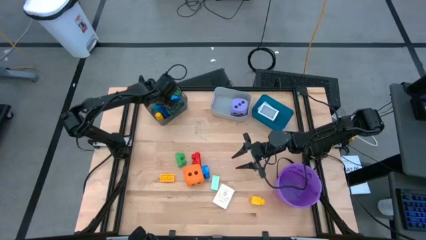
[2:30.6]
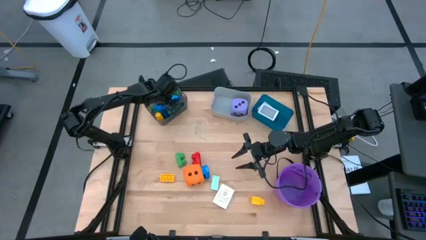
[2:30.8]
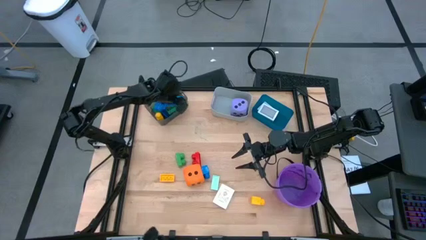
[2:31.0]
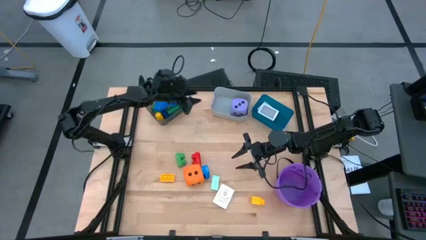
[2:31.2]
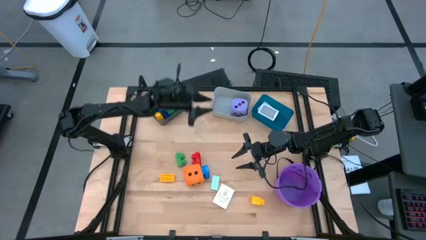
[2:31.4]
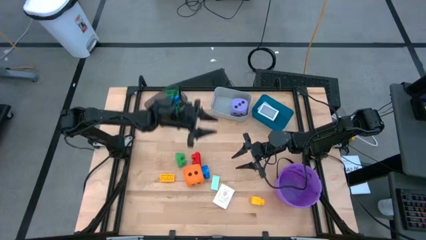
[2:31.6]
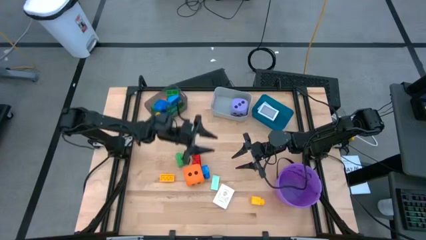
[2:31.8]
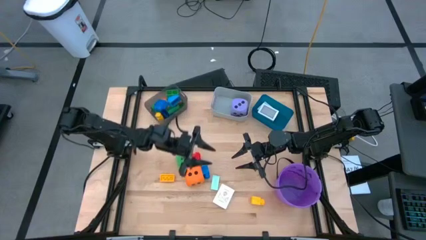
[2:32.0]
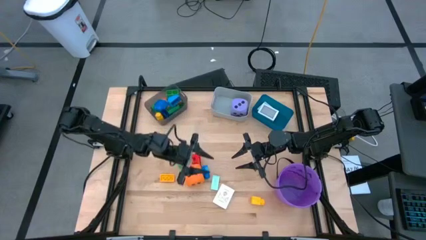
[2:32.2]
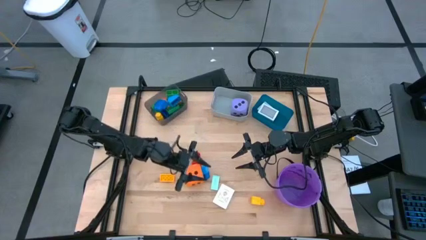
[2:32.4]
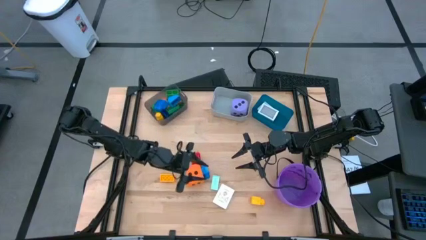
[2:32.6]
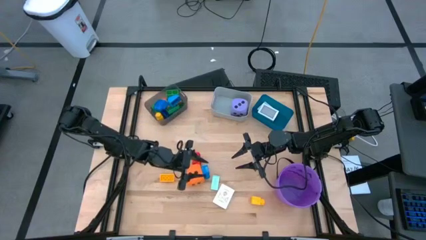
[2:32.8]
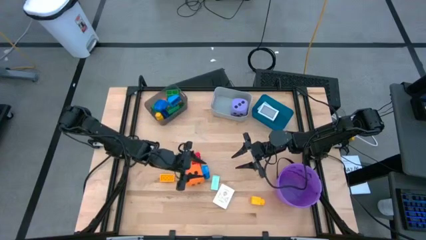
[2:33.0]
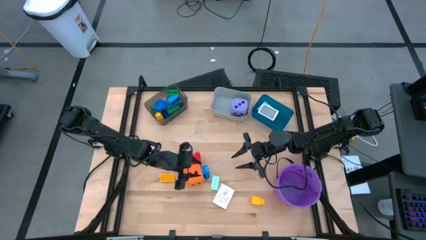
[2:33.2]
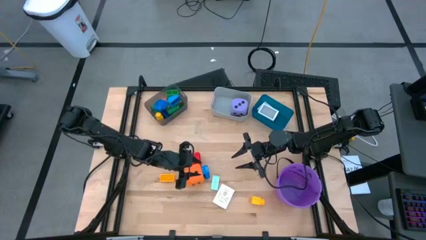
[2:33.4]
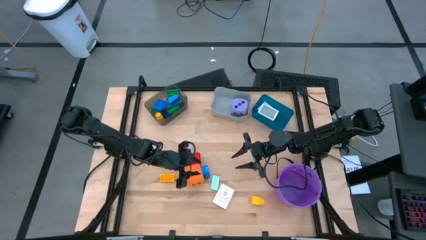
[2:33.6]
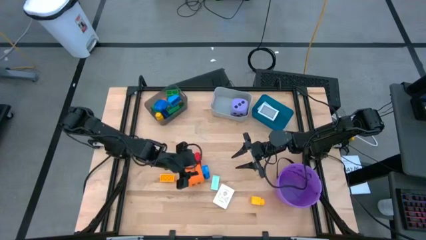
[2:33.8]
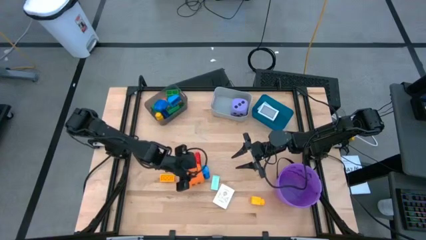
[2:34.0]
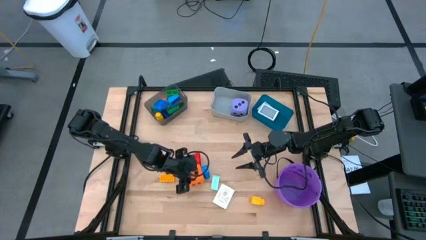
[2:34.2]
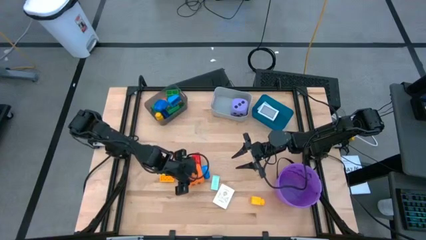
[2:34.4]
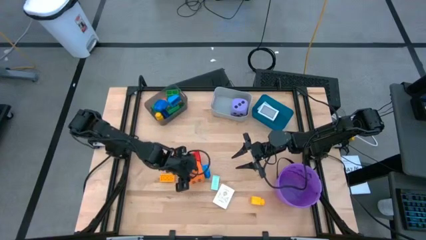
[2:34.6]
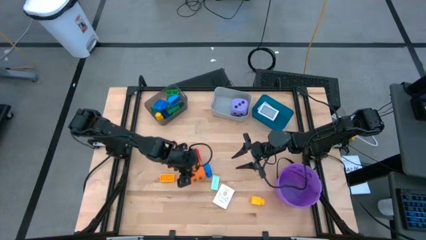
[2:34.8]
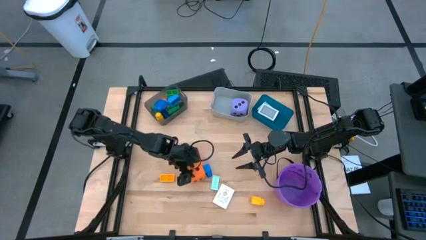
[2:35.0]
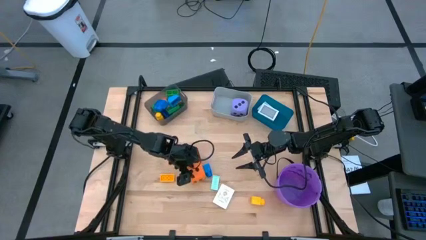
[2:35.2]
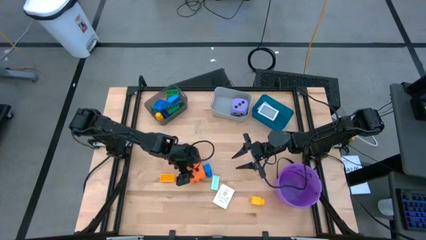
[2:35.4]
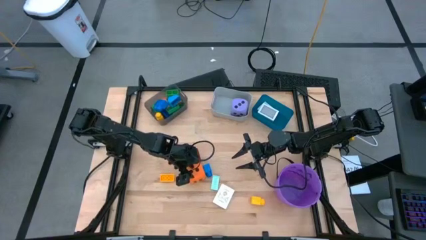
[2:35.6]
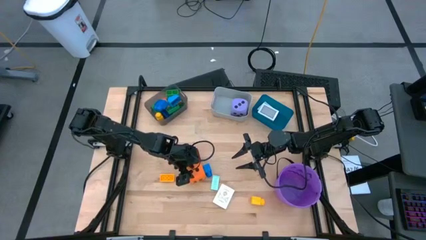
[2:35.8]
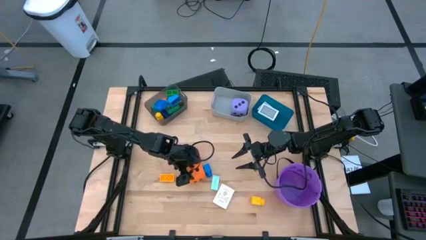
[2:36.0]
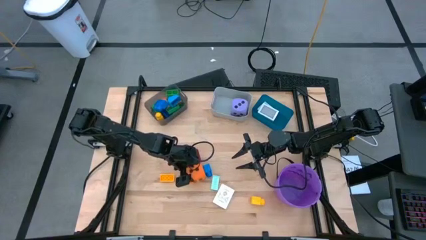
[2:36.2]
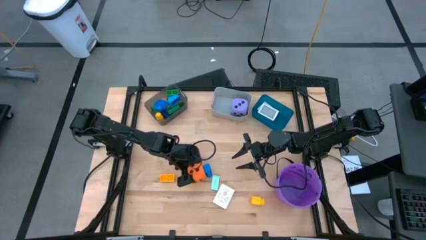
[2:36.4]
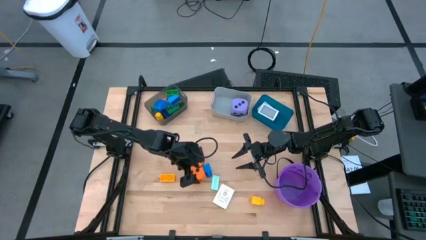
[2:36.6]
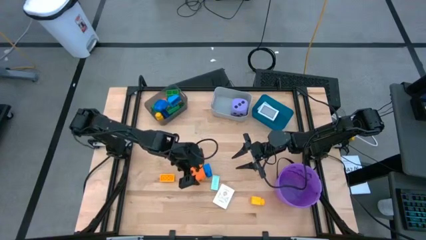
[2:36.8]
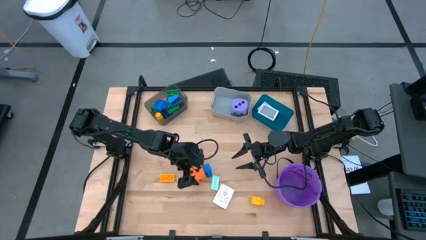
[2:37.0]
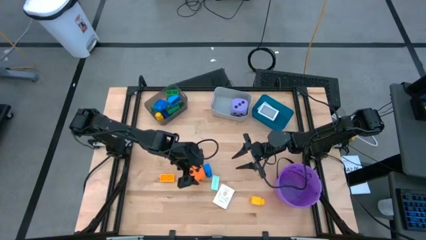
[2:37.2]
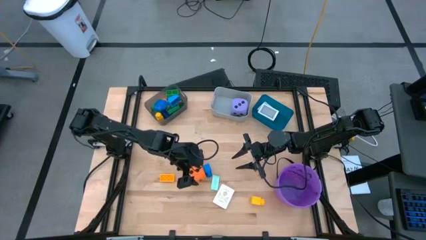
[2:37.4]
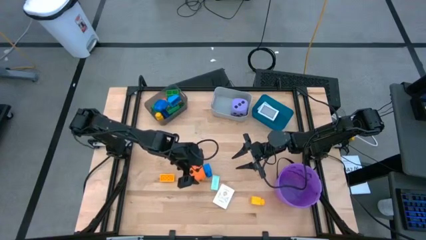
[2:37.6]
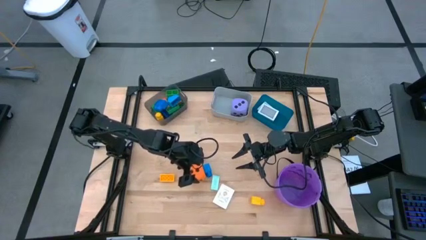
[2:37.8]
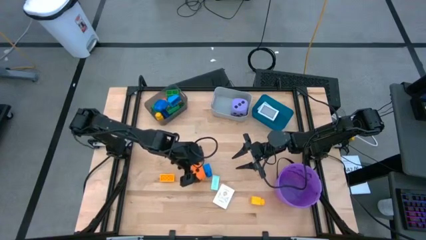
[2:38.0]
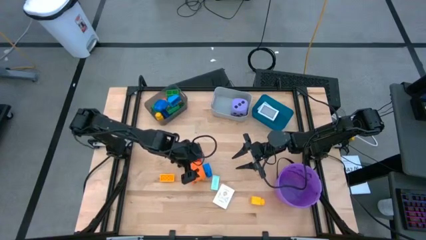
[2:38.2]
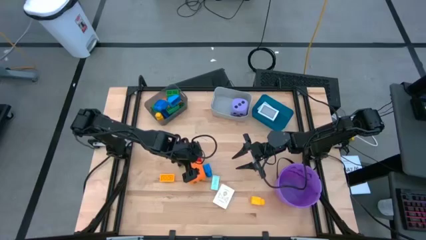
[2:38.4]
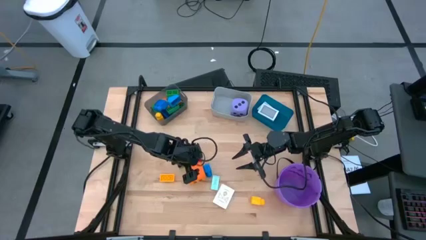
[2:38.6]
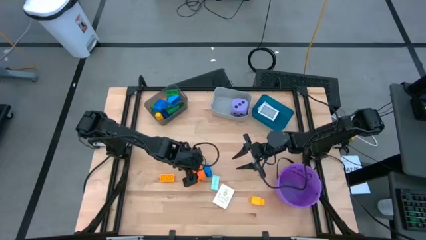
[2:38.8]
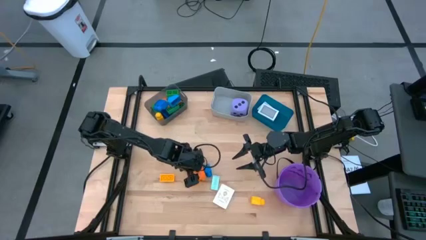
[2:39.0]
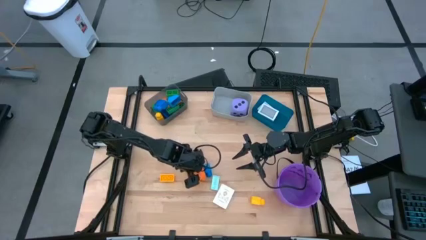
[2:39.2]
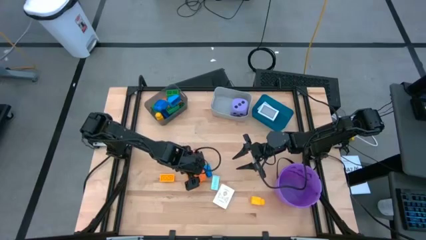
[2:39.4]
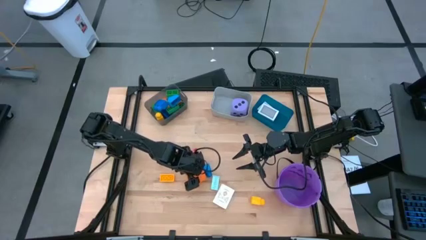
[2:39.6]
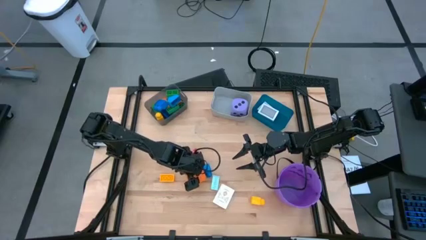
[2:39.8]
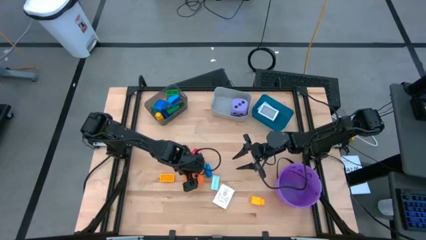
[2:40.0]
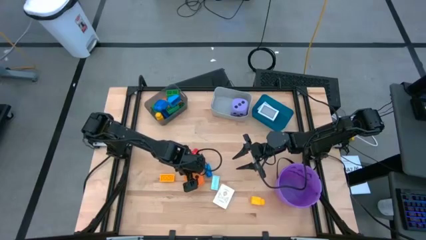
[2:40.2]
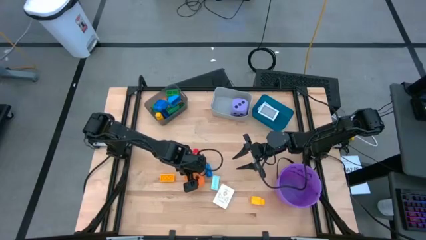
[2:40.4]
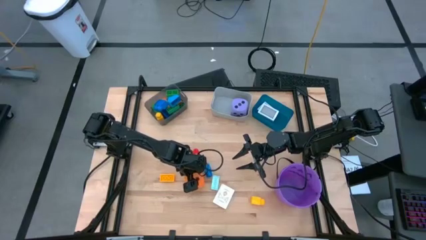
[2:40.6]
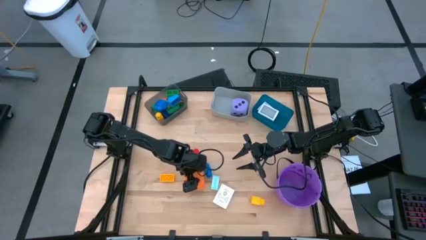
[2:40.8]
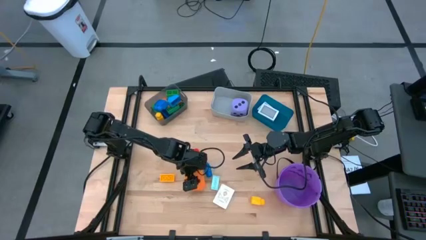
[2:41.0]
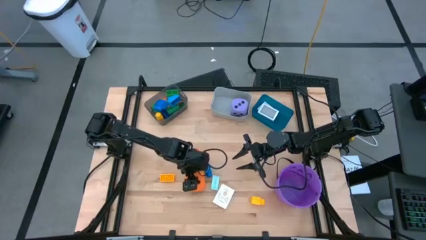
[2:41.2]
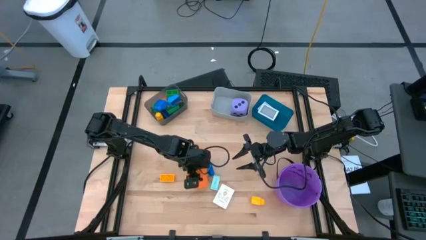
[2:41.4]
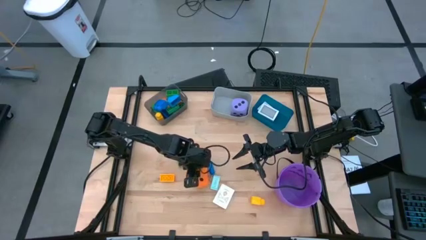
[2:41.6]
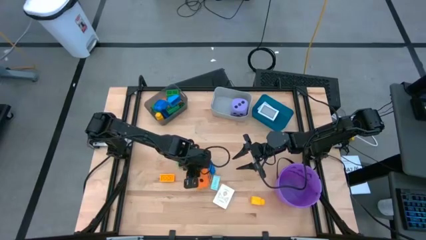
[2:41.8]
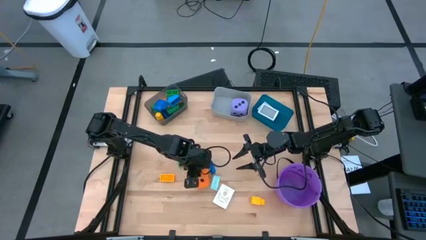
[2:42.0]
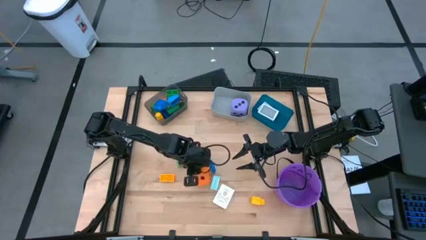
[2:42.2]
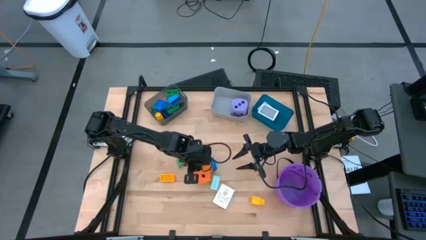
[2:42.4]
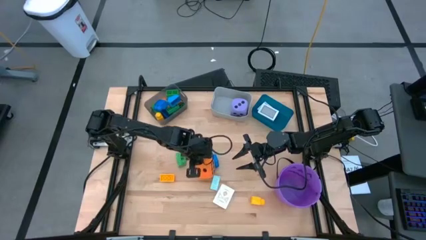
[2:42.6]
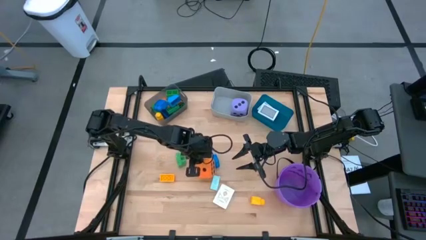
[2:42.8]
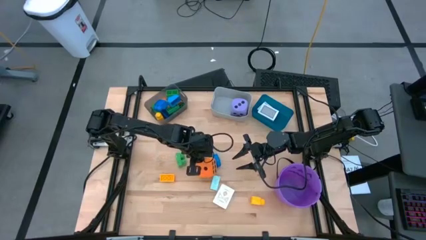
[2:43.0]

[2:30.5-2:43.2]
Task: Pick & Place Toys
Put the orange dice into the gray bin
